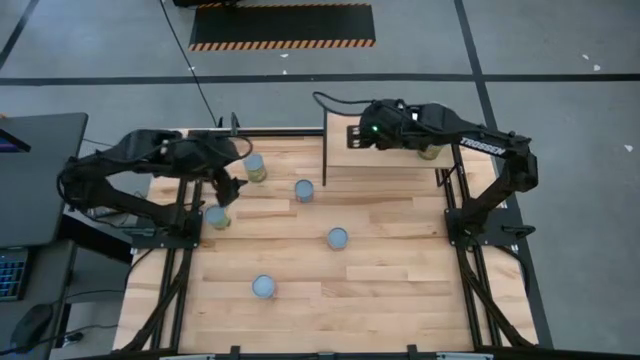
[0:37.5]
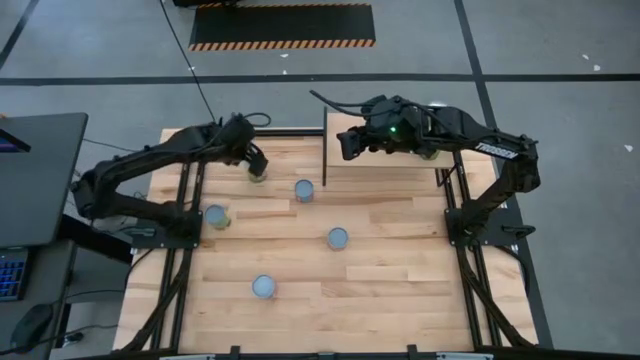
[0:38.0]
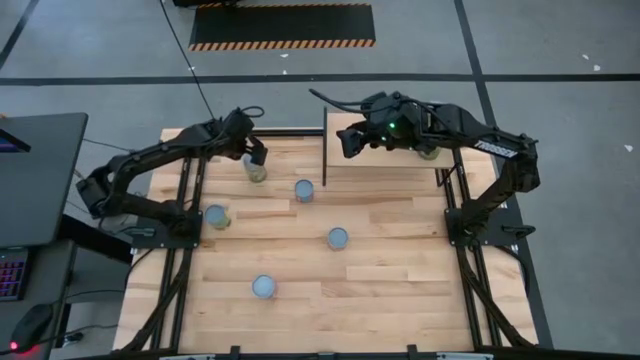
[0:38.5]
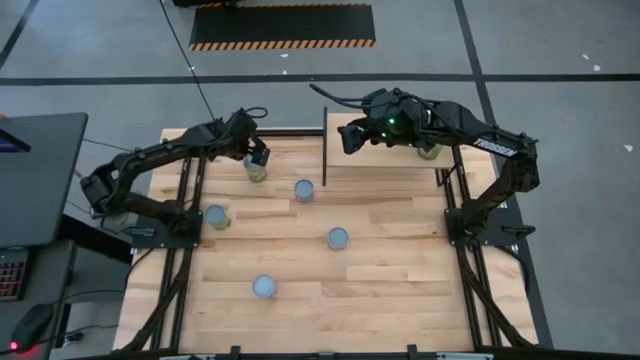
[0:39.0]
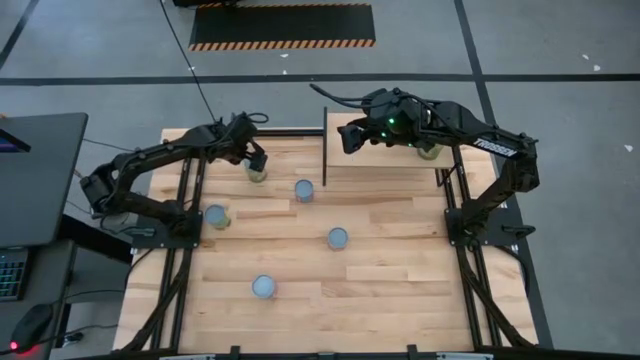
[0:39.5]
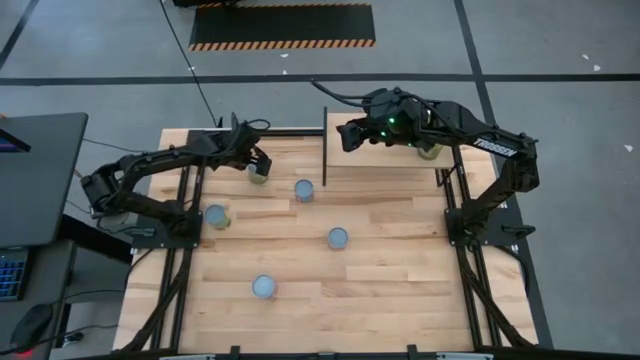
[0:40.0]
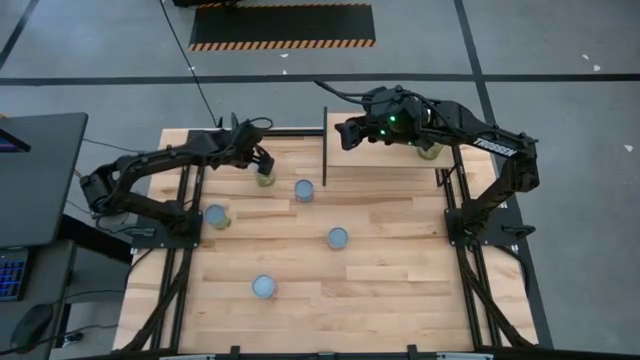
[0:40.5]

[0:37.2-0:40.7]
Task: Pick and place cans onto a shelf
Put the large canned pears on the shelf

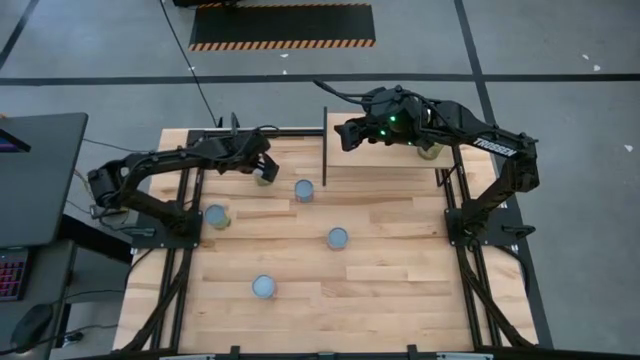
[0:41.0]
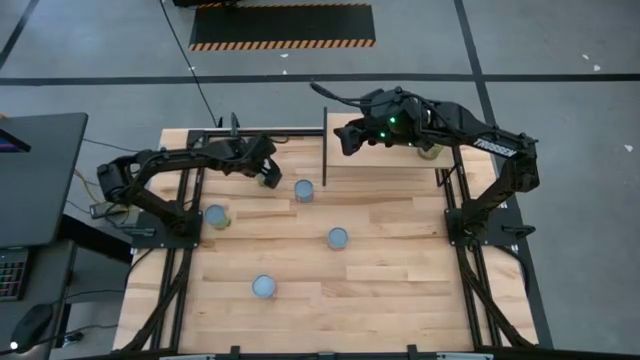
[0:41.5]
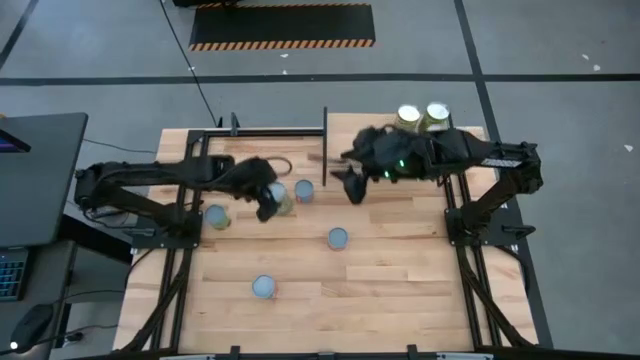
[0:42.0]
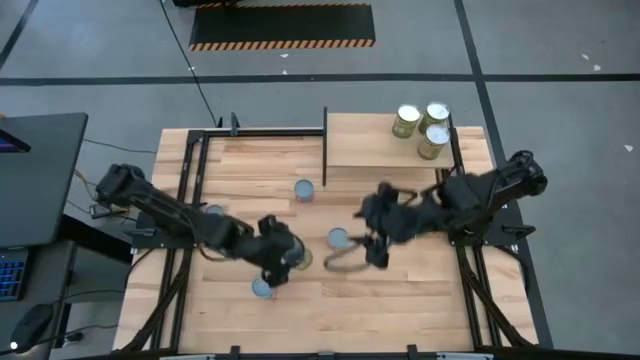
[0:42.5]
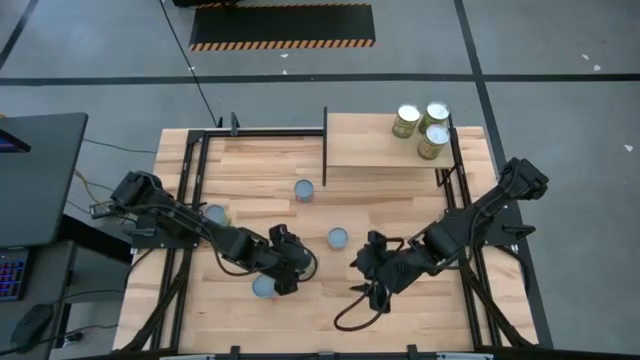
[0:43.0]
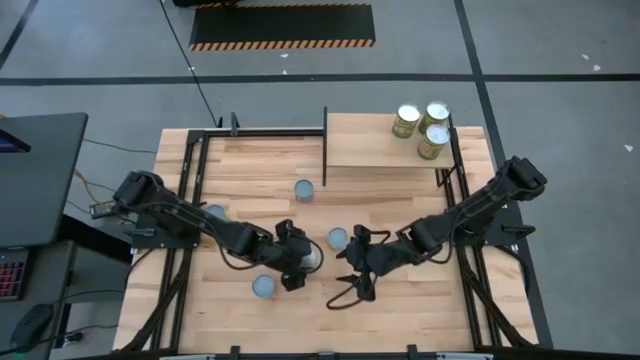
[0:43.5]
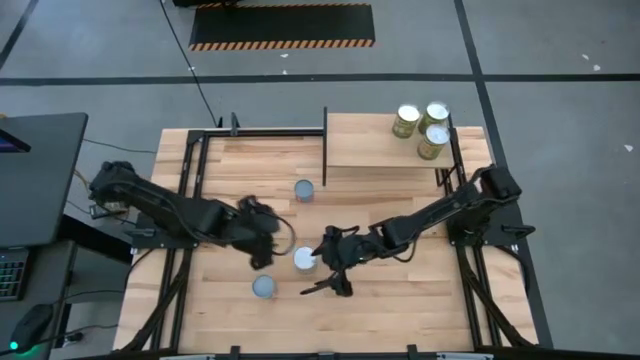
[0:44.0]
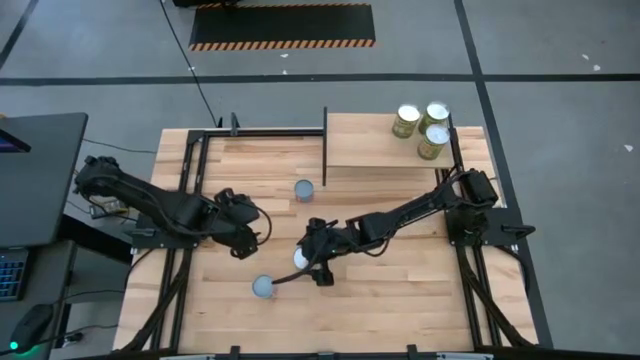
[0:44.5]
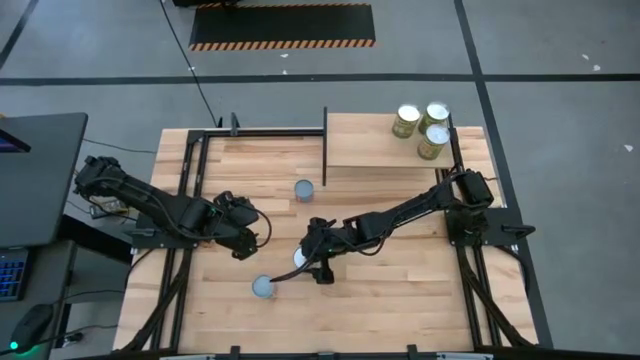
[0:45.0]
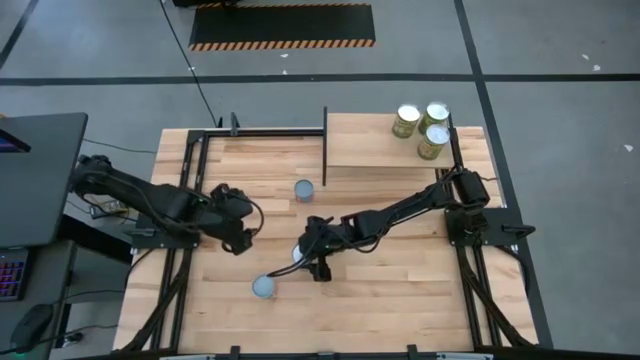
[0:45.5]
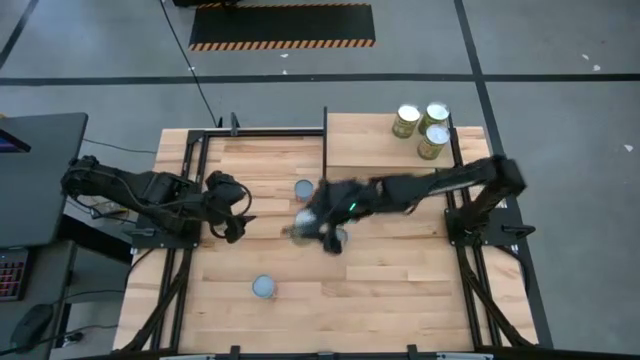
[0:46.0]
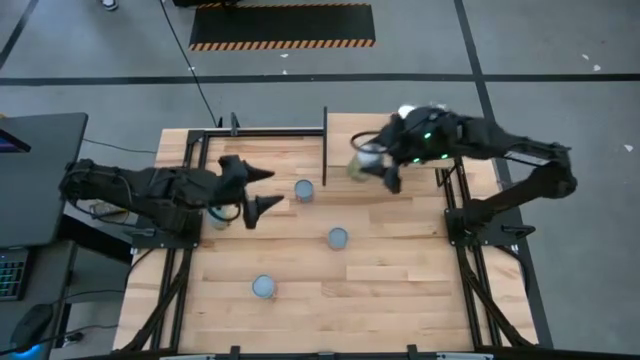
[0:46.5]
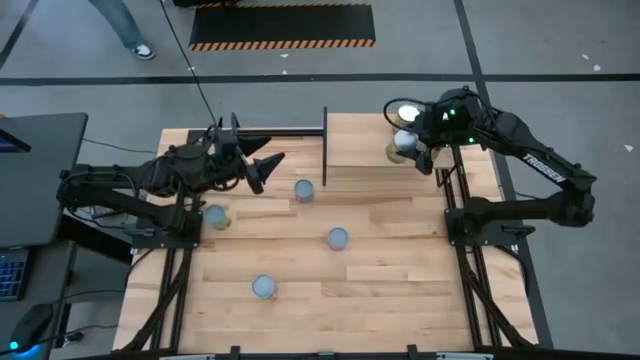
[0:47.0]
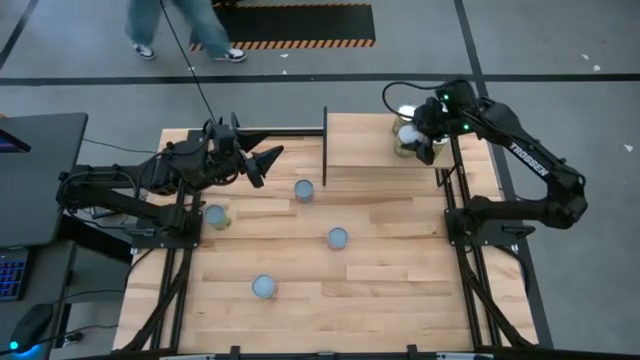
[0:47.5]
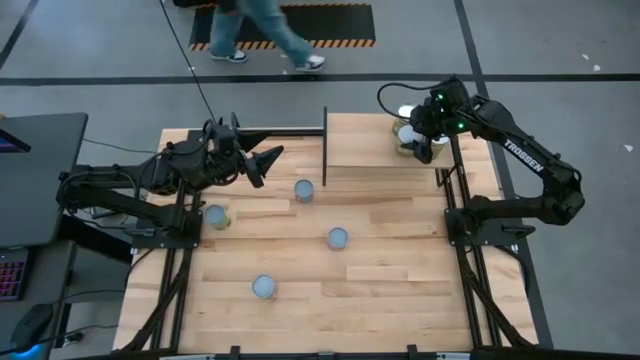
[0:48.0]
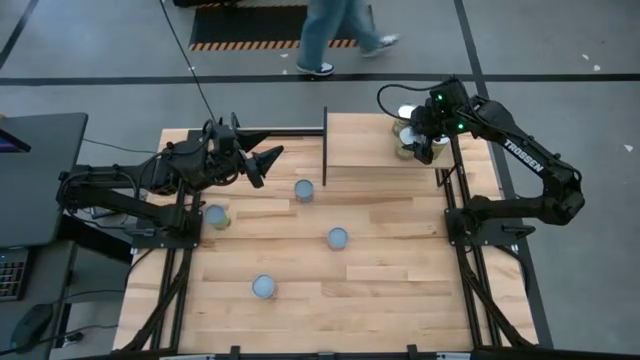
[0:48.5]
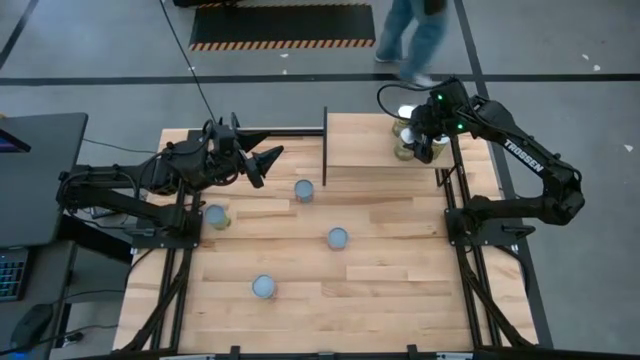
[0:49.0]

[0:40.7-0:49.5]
Put the large canned pears on the shelf

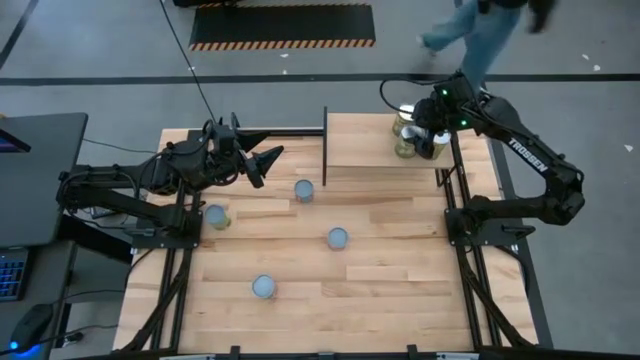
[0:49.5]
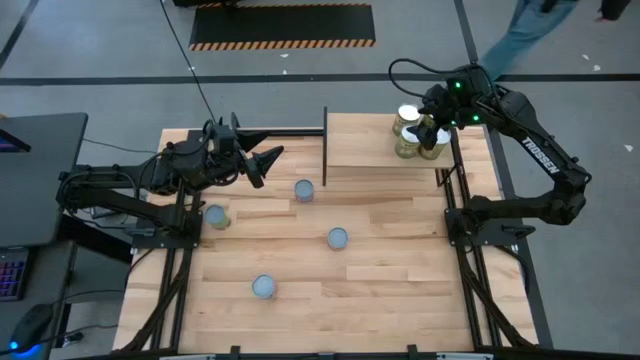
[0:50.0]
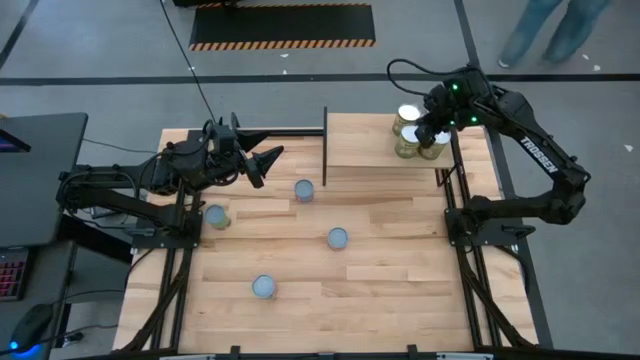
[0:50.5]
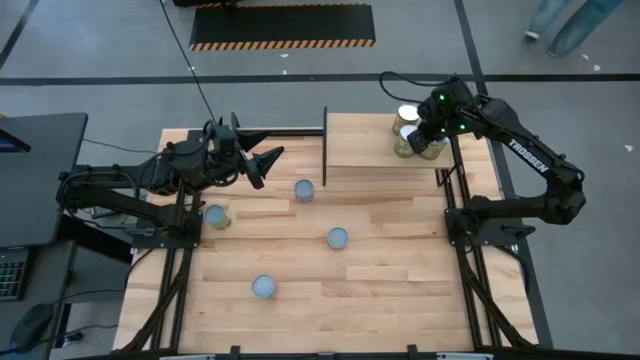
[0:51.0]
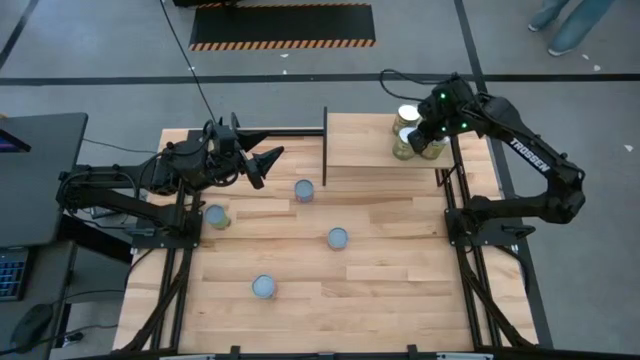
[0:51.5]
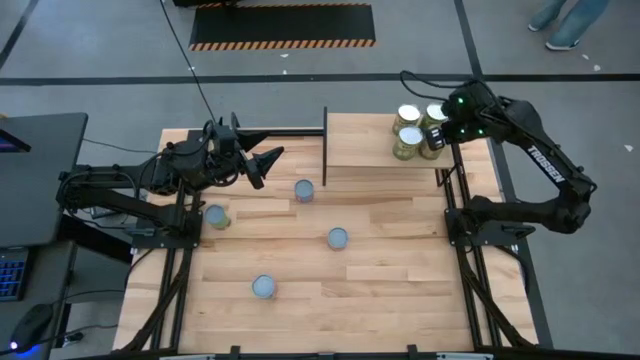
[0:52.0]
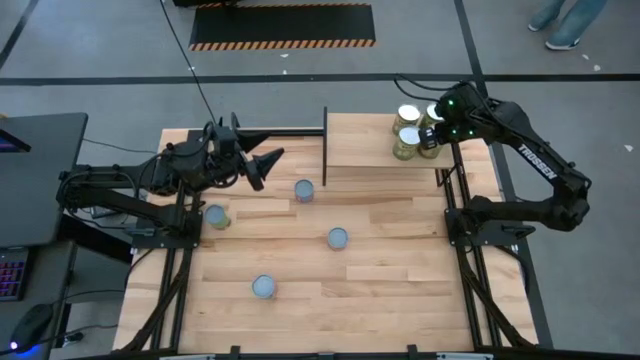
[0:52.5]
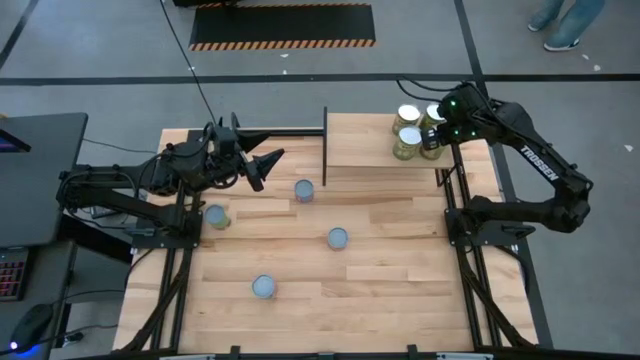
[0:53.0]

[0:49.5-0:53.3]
Adjust the cans on the shelf

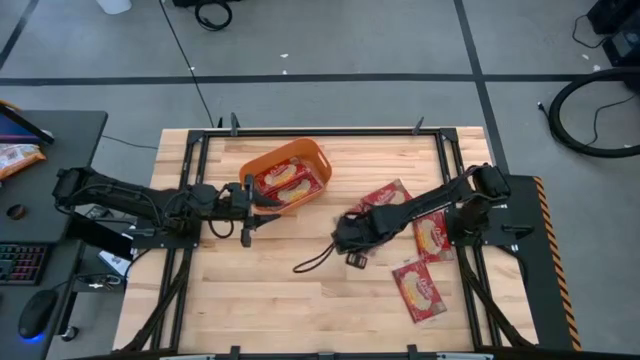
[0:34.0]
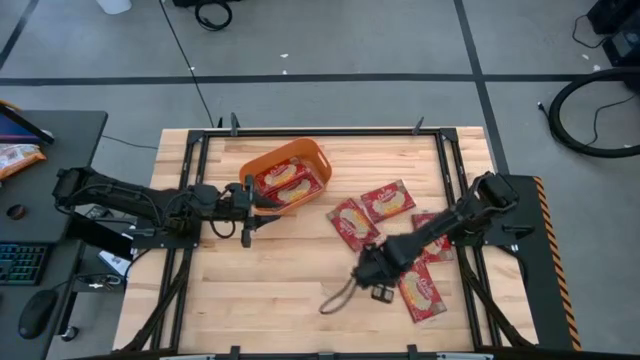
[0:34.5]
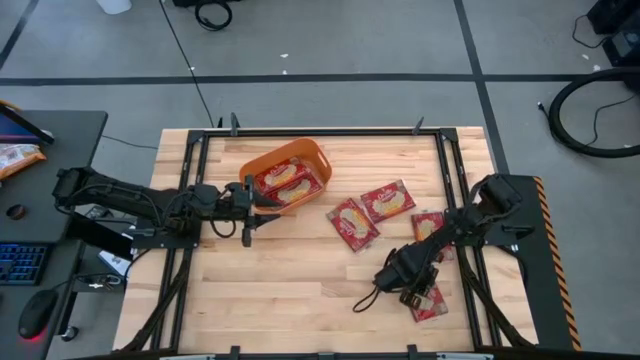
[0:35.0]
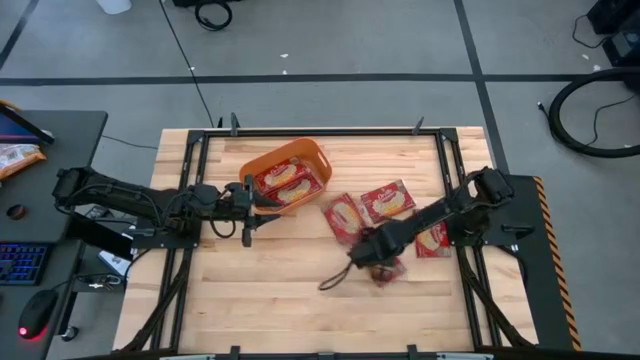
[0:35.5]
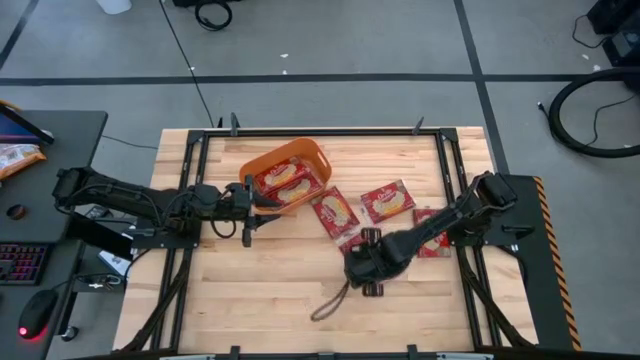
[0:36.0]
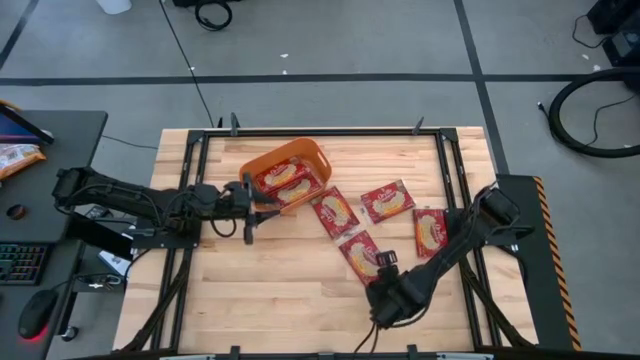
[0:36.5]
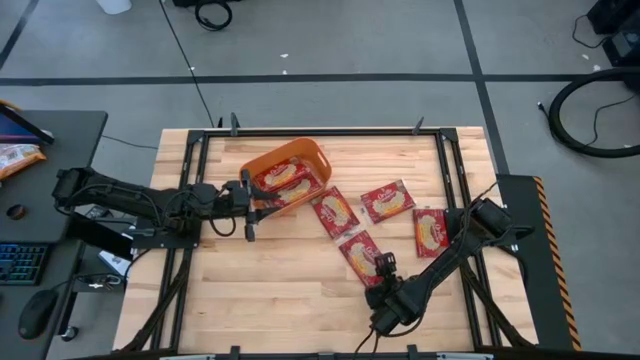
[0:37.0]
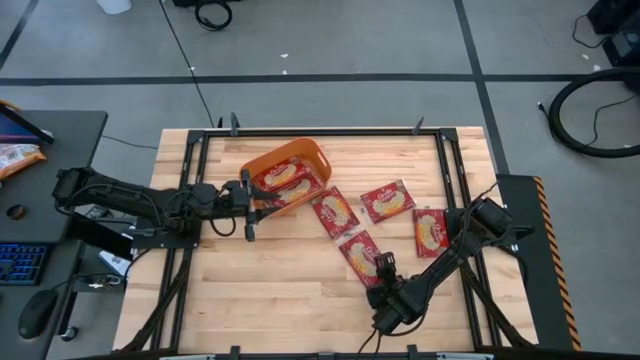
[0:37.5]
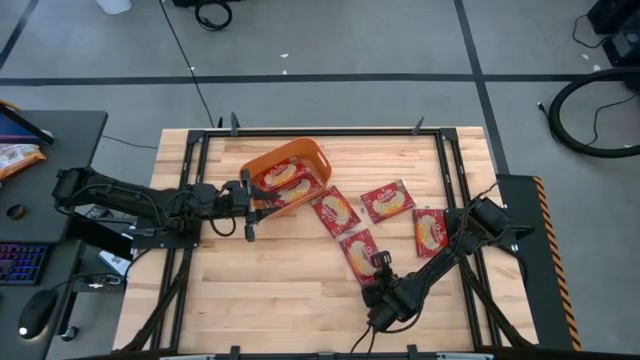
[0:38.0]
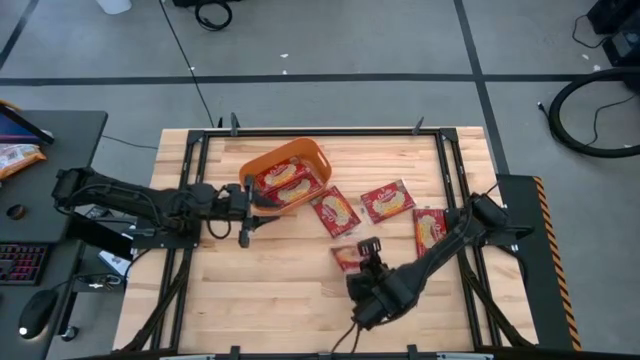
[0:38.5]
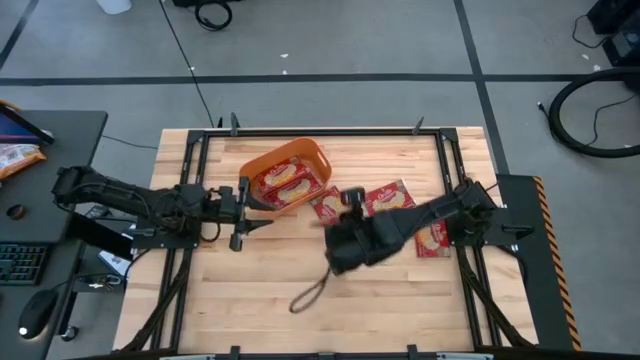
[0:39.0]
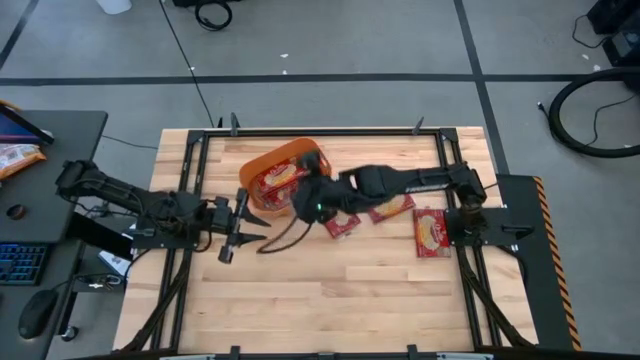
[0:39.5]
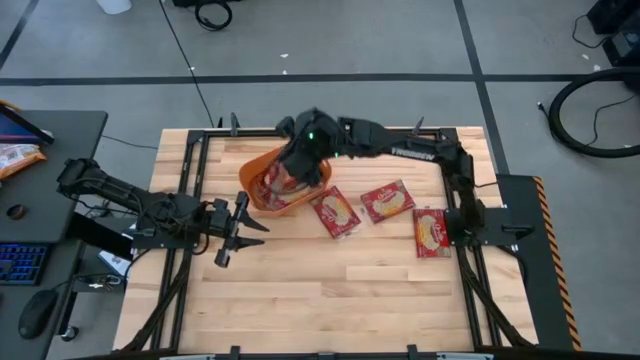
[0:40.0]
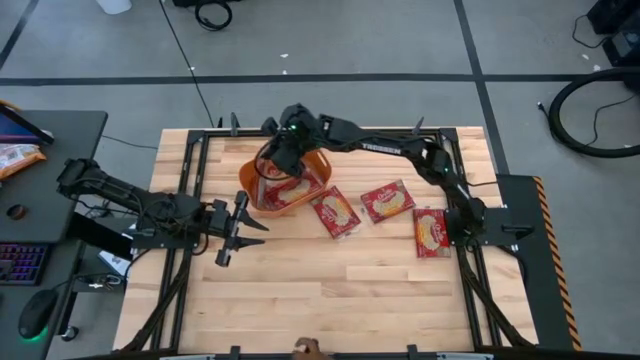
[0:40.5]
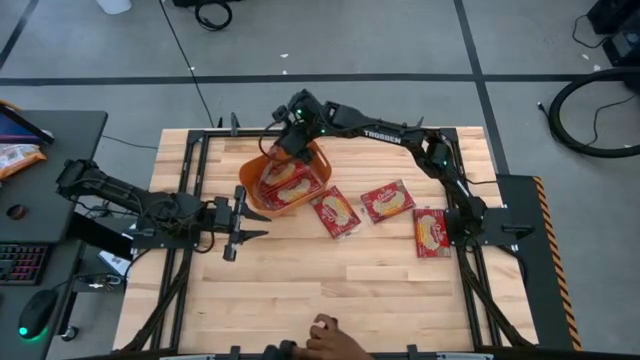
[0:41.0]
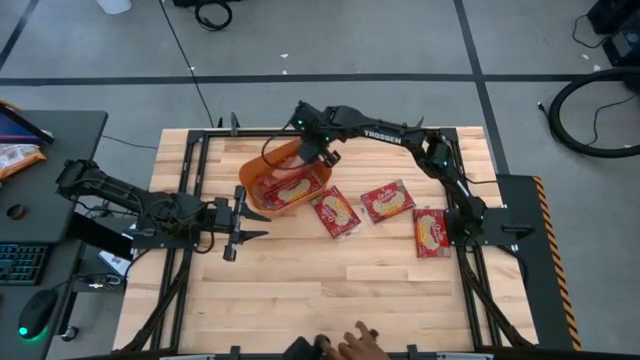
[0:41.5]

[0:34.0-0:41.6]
Task: Sort popcorn bags into baskets
Put the red popcorn bag into the orange bin
